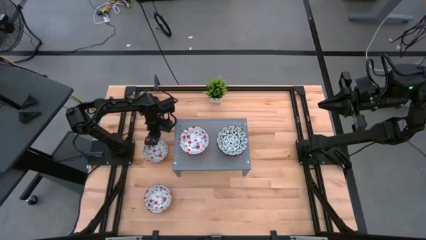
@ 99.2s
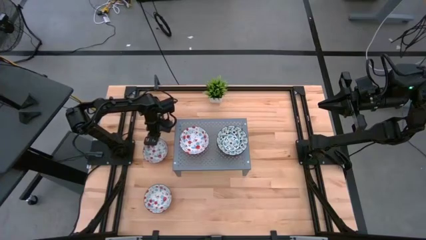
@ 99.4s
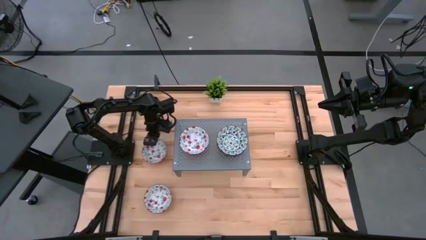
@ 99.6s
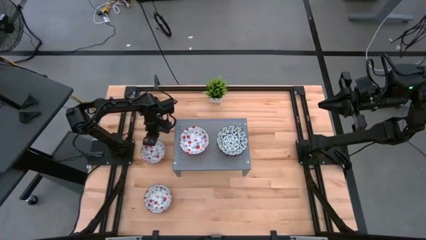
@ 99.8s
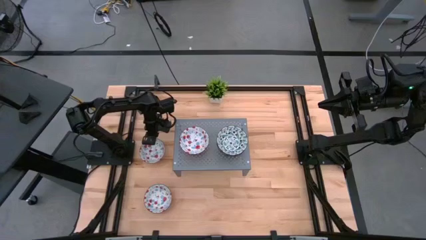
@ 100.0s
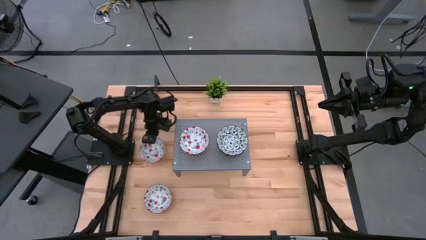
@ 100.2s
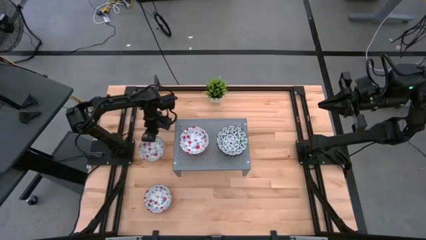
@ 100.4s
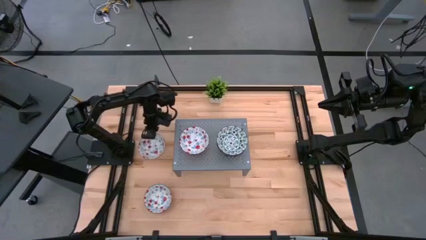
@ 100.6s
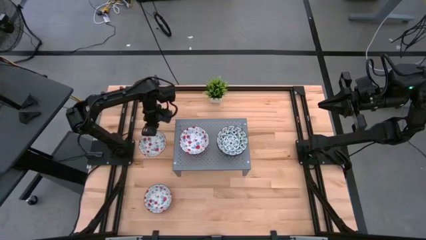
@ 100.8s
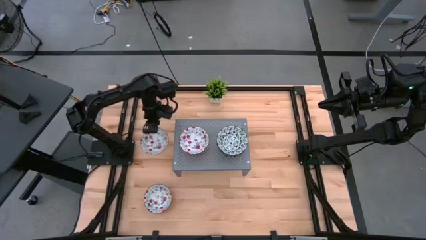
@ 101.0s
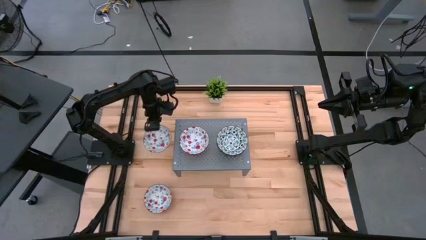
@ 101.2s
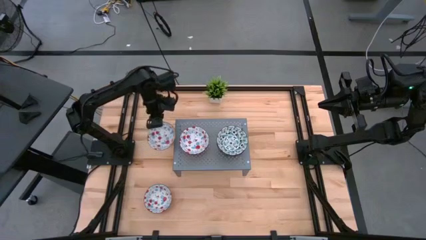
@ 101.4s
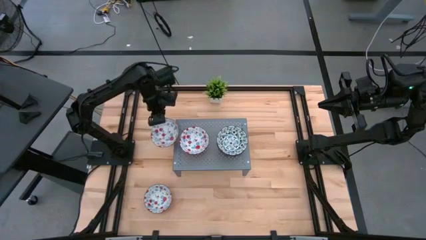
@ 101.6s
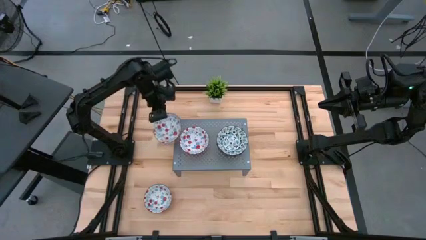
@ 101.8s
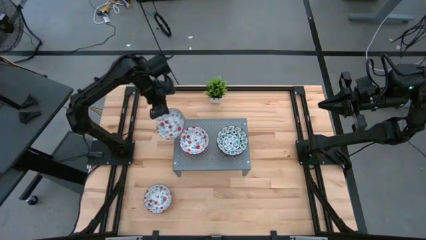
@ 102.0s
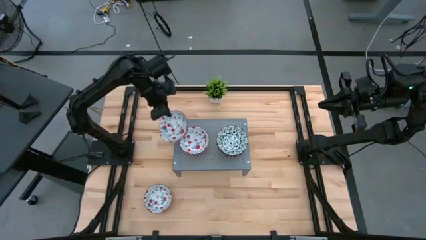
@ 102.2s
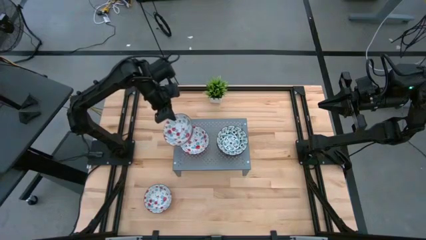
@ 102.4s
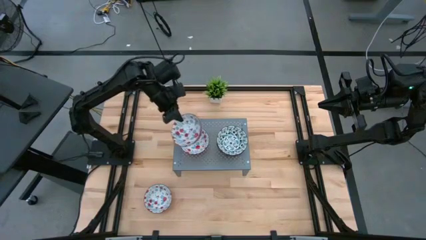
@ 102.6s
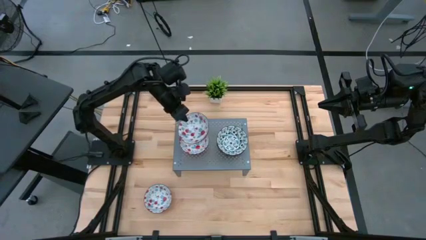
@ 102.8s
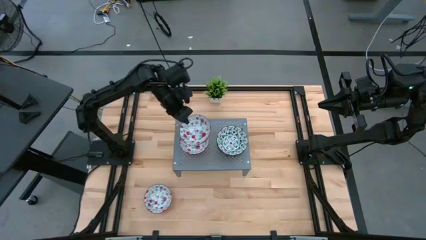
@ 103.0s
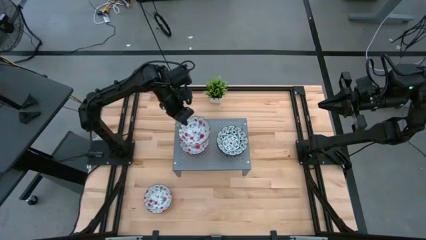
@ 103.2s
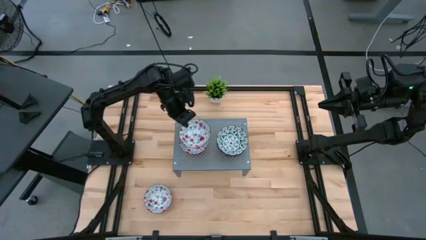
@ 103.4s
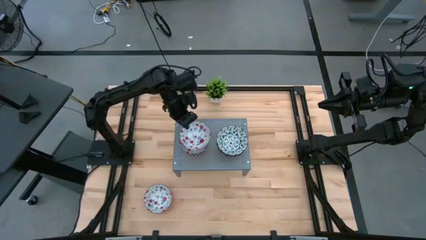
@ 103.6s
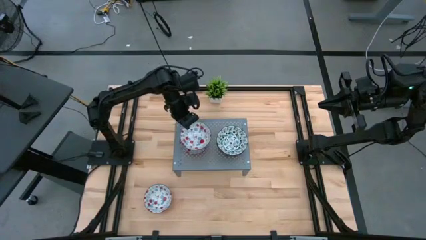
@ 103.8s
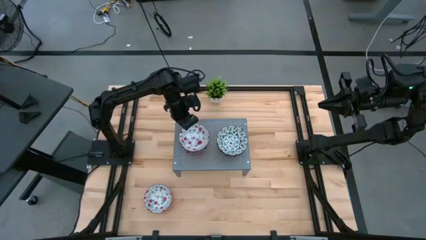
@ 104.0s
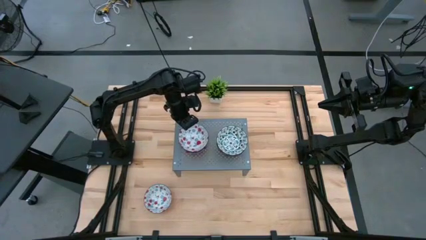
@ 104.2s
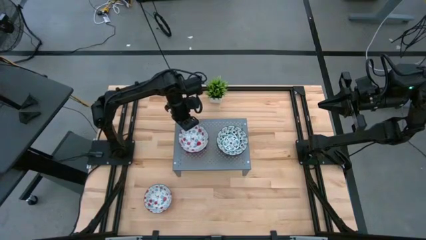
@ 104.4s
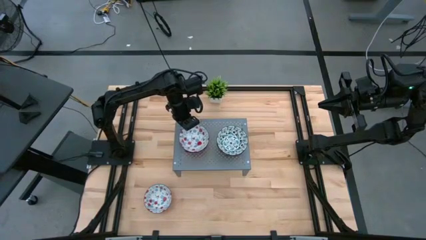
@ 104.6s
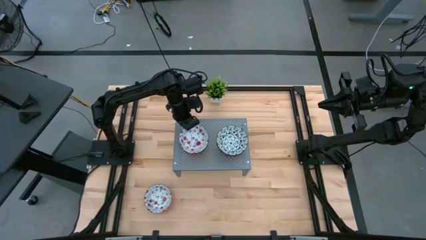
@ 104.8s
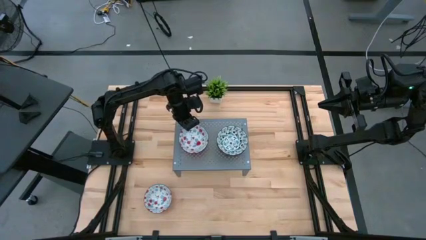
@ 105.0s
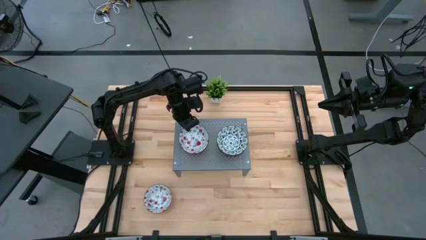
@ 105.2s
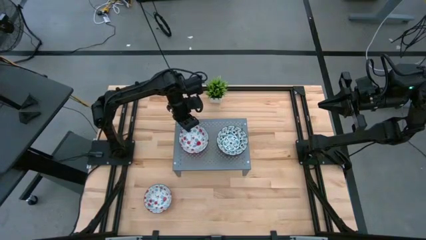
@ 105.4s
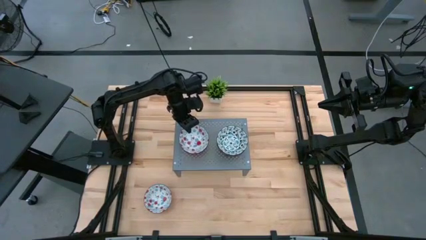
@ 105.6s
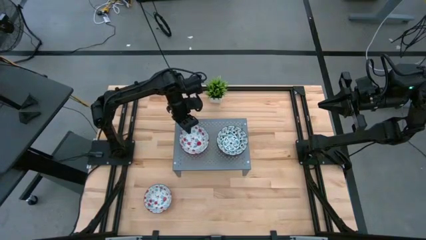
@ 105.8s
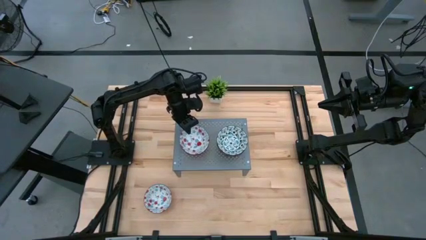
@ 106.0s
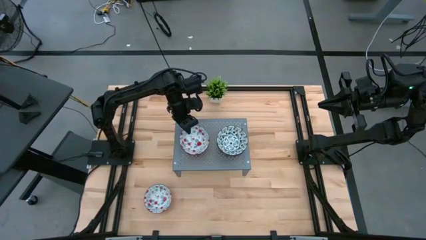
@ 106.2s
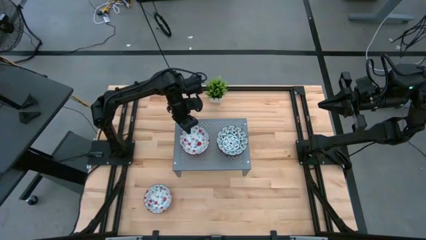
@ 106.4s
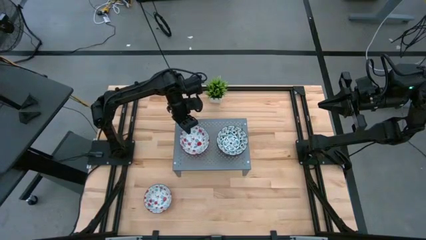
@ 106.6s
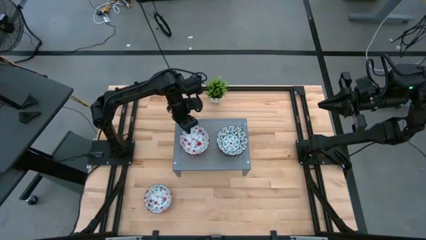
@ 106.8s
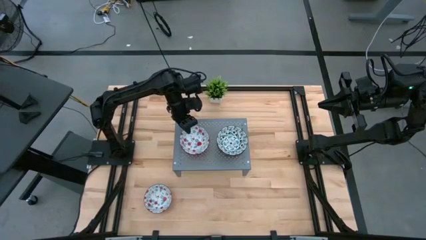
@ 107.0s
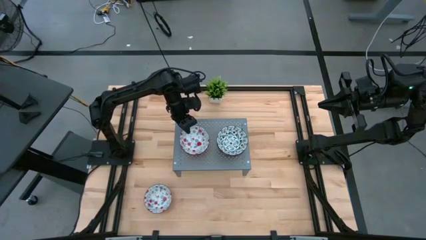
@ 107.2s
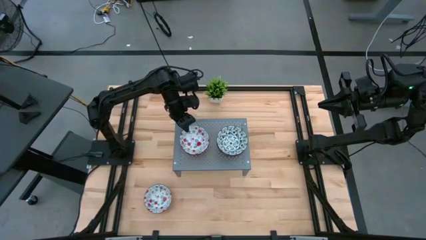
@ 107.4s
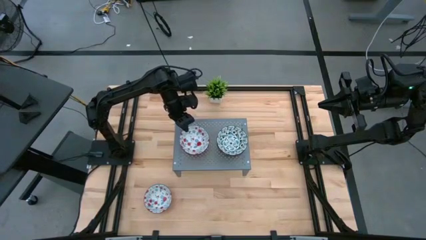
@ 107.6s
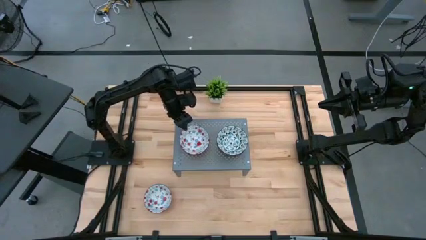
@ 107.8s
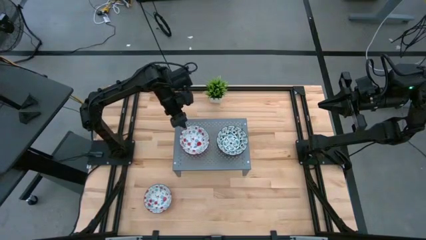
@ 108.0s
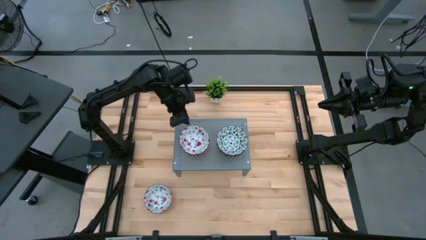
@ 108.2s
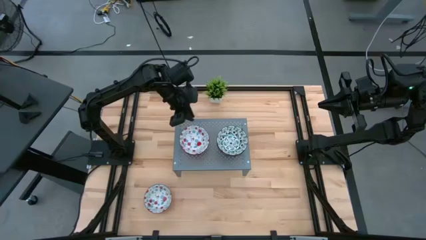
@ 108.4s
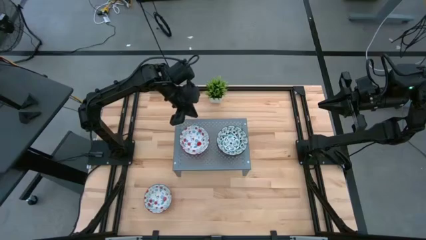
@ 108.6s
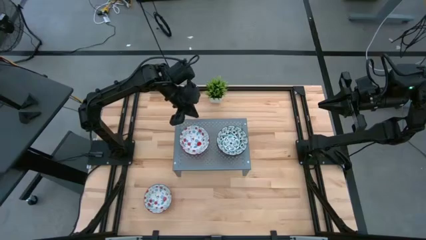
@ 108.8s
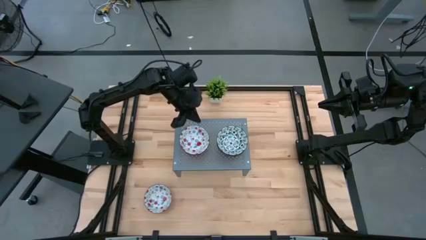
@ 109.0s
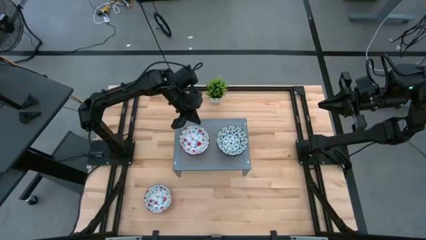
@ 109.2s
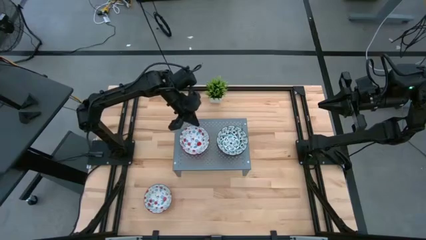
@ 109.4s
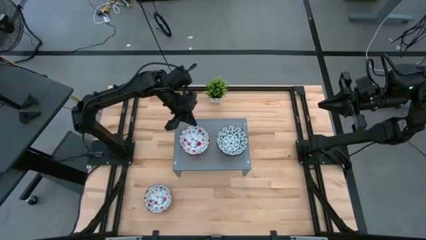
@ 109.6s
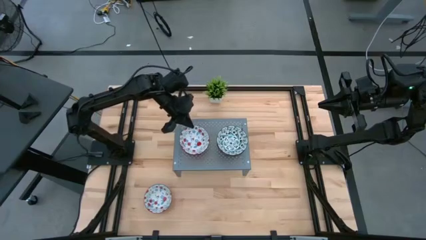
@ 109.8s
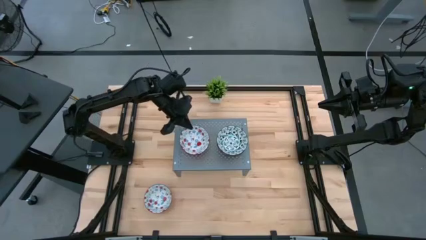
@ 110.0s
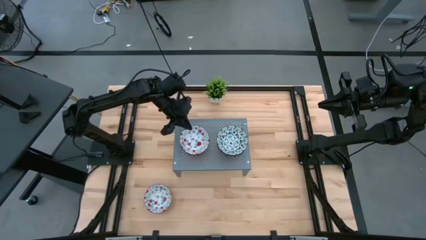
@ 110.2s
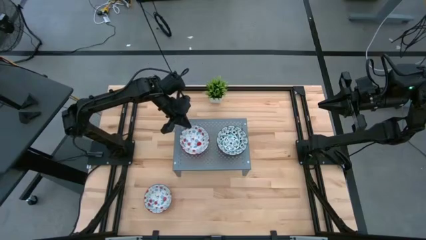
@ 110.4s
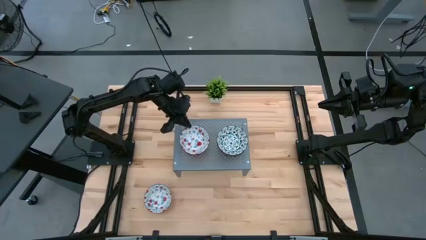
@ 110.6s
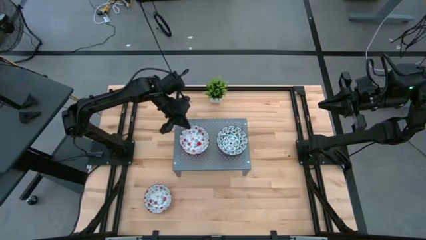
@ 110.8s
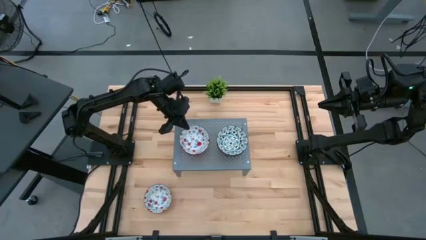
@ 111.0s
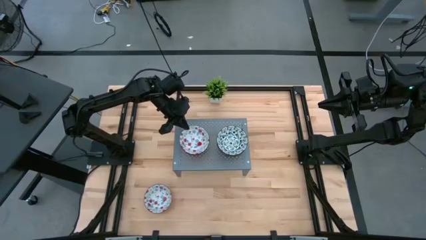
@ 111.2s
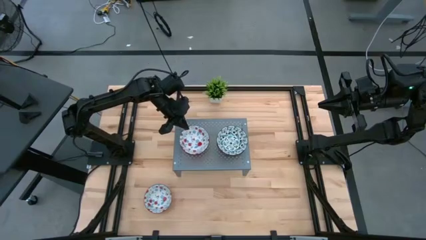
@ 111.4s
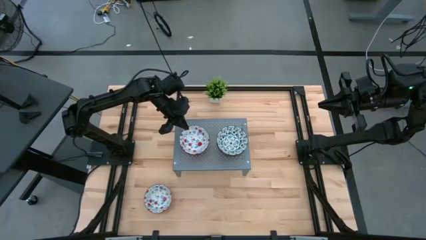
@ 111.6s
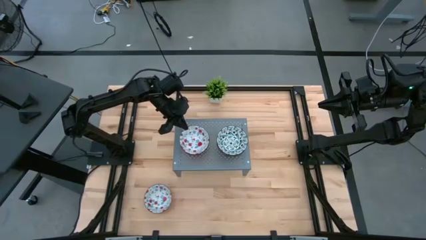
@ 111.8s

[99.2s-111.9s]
Task: Pick & Place Mini bowls
Stack the top red patterned bowl on the other red patterned bowl on the shelf
